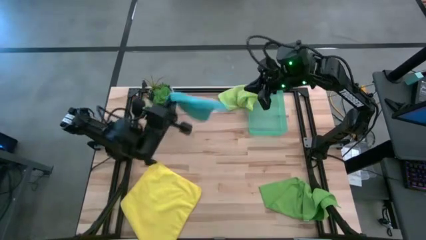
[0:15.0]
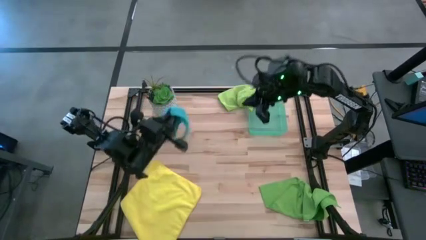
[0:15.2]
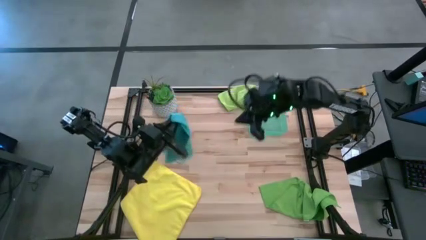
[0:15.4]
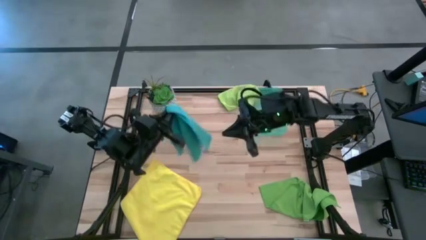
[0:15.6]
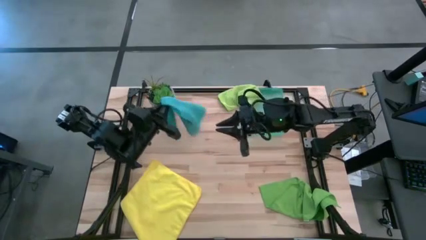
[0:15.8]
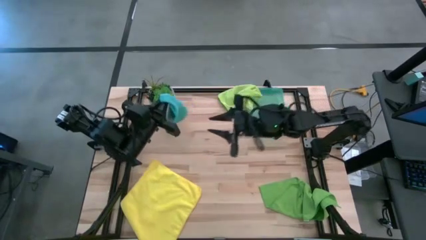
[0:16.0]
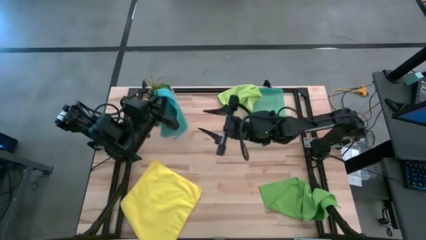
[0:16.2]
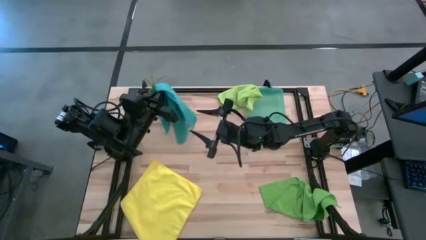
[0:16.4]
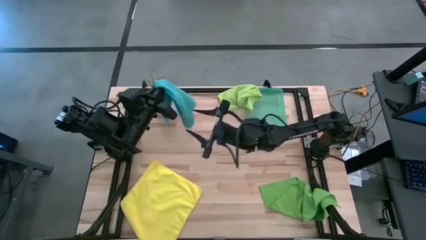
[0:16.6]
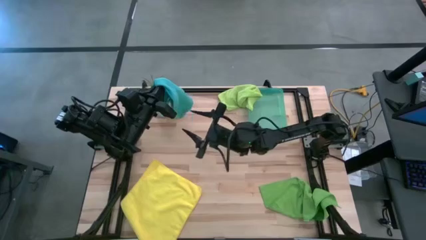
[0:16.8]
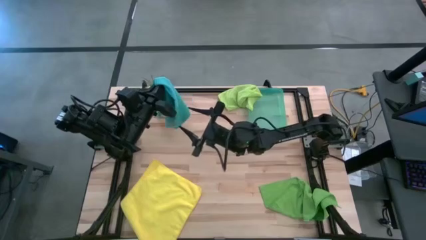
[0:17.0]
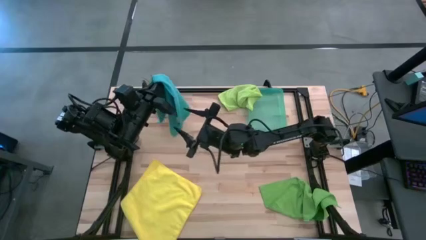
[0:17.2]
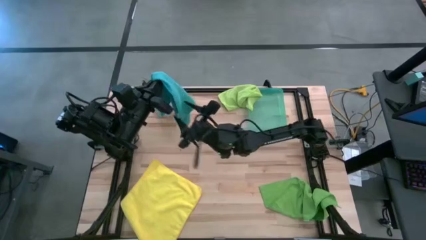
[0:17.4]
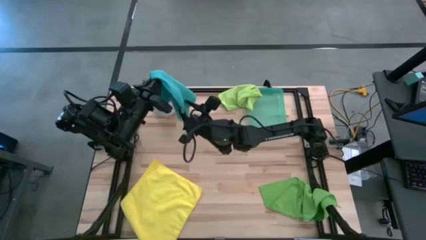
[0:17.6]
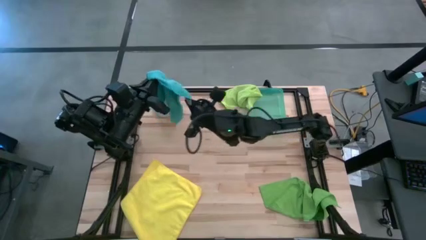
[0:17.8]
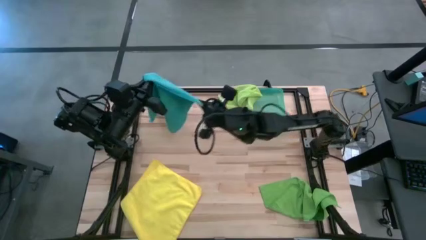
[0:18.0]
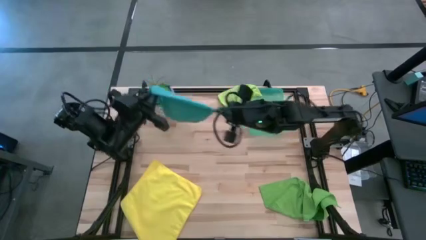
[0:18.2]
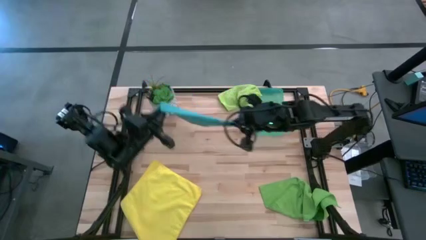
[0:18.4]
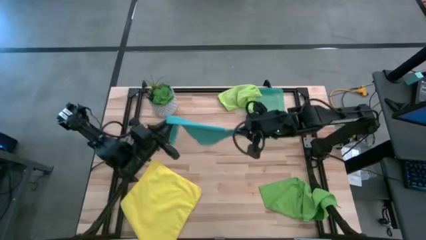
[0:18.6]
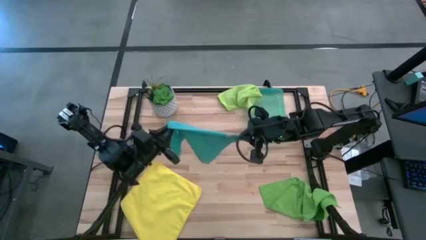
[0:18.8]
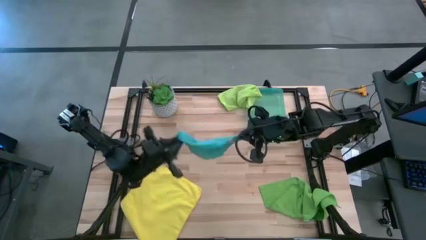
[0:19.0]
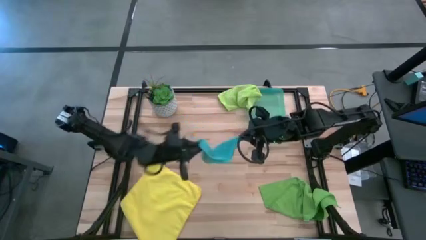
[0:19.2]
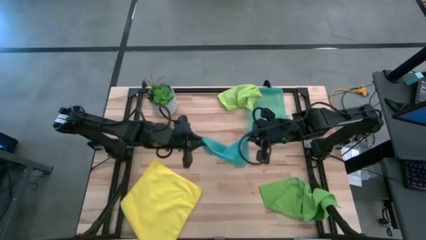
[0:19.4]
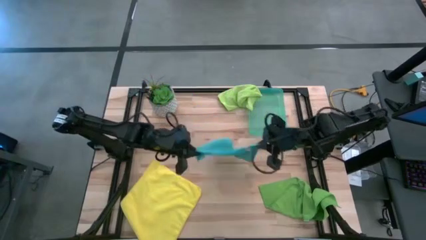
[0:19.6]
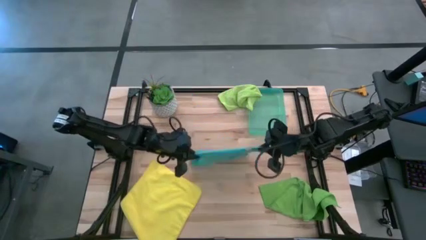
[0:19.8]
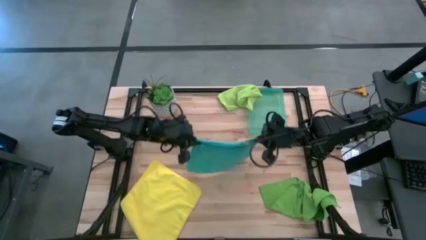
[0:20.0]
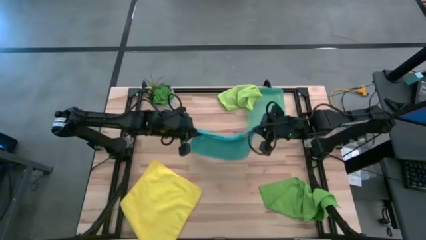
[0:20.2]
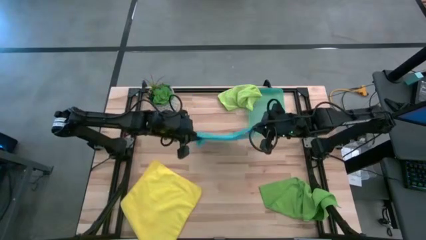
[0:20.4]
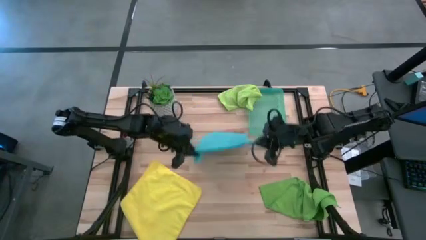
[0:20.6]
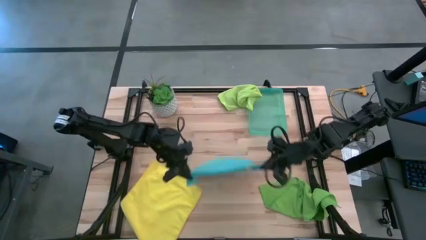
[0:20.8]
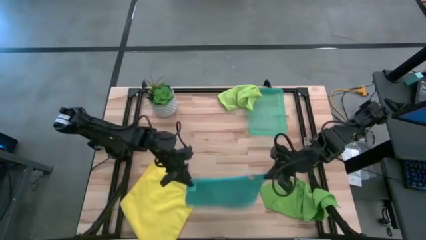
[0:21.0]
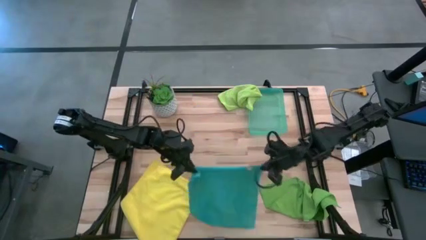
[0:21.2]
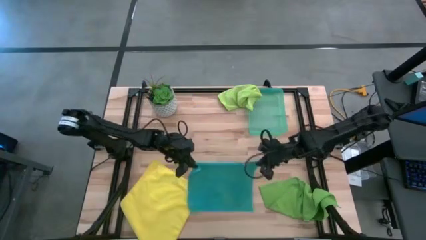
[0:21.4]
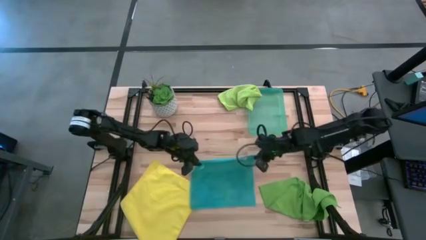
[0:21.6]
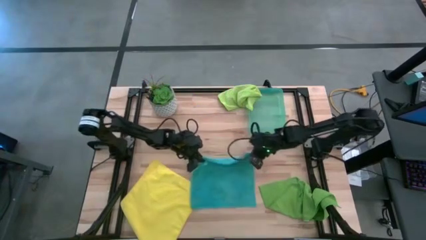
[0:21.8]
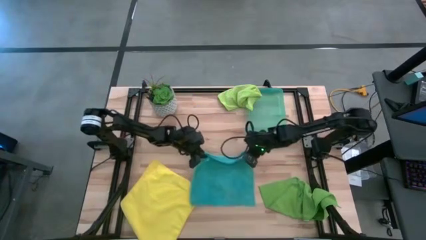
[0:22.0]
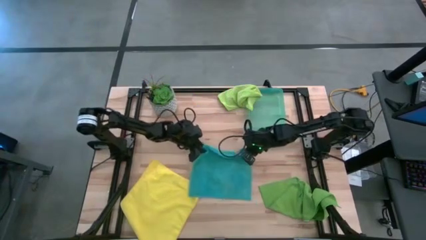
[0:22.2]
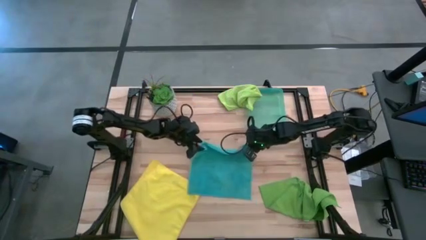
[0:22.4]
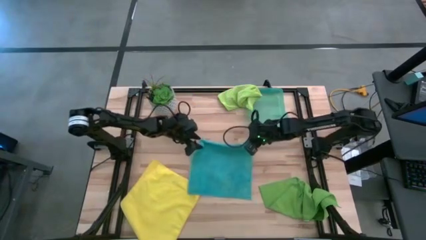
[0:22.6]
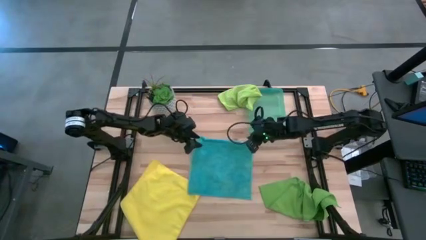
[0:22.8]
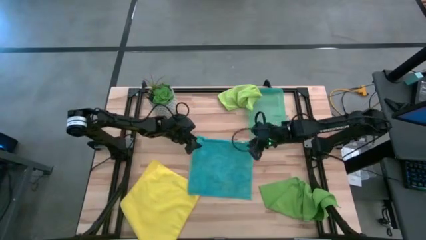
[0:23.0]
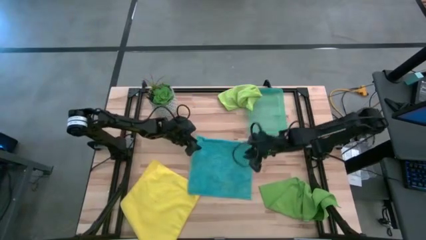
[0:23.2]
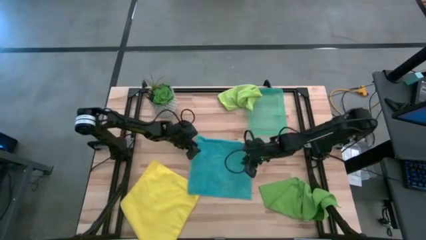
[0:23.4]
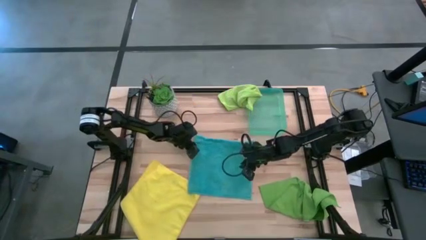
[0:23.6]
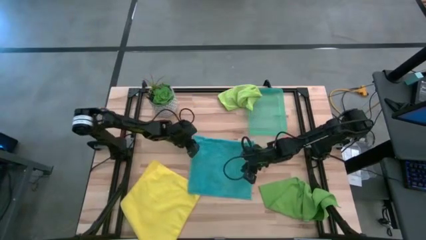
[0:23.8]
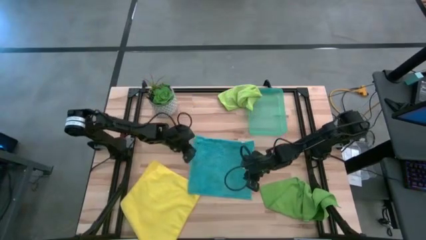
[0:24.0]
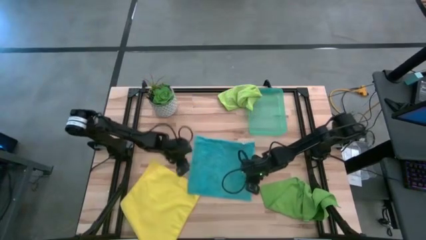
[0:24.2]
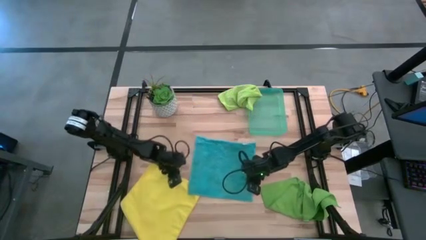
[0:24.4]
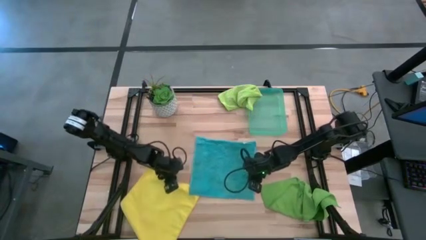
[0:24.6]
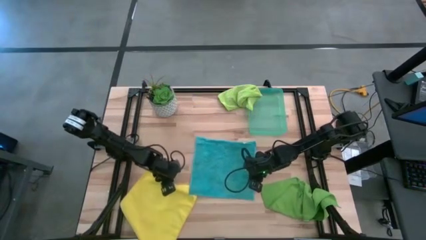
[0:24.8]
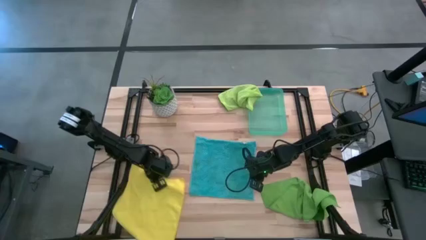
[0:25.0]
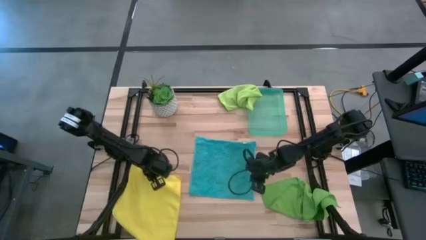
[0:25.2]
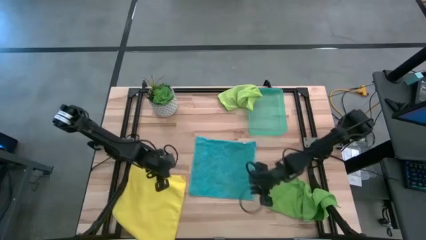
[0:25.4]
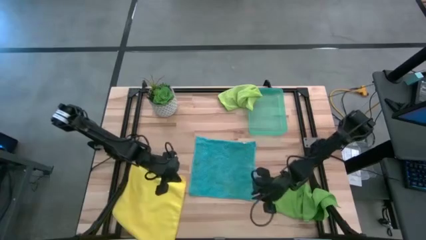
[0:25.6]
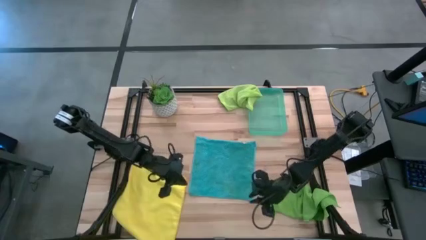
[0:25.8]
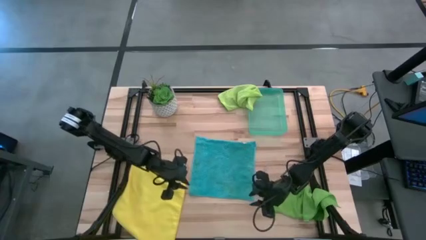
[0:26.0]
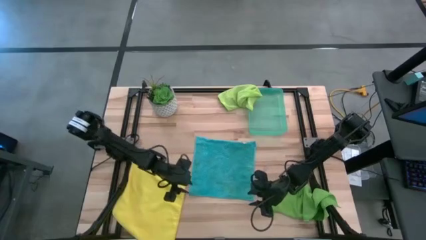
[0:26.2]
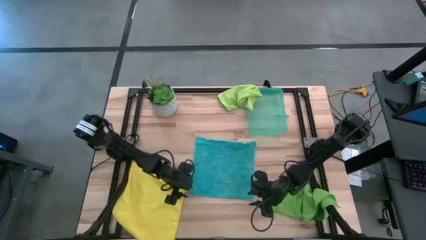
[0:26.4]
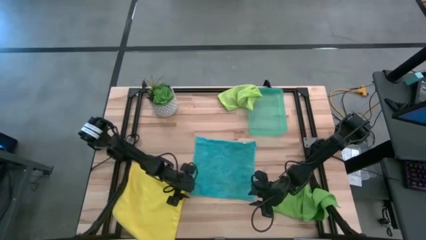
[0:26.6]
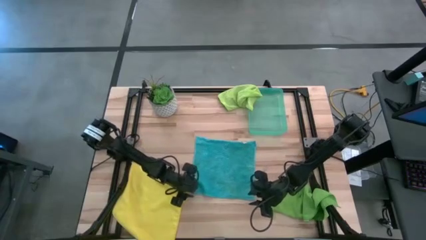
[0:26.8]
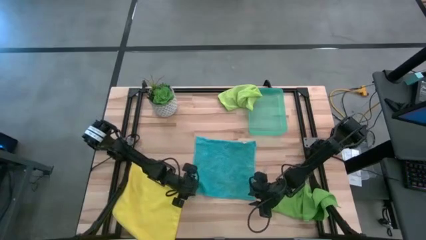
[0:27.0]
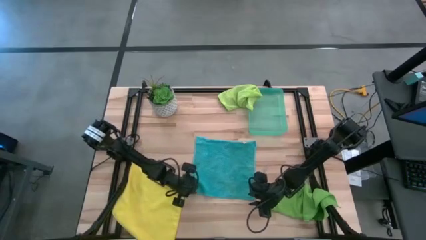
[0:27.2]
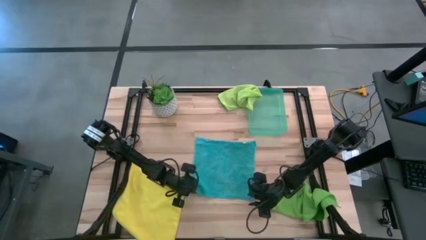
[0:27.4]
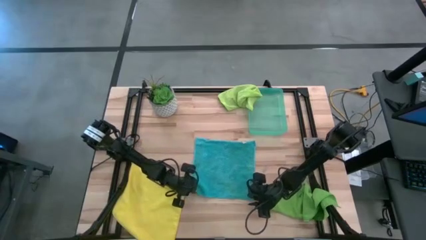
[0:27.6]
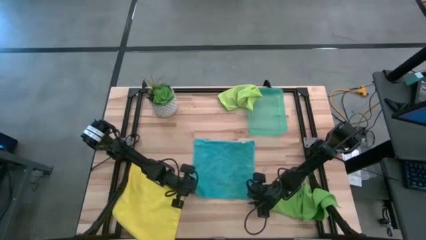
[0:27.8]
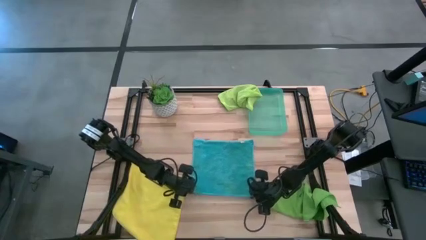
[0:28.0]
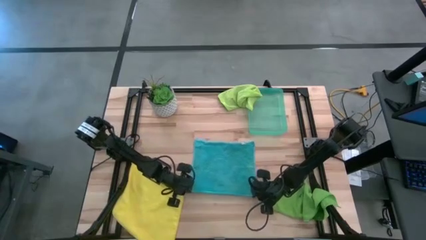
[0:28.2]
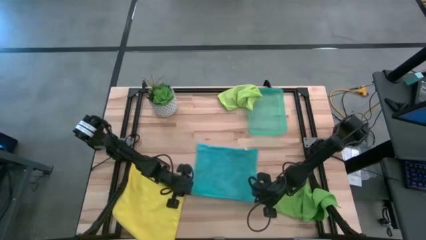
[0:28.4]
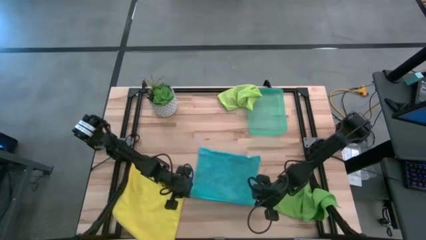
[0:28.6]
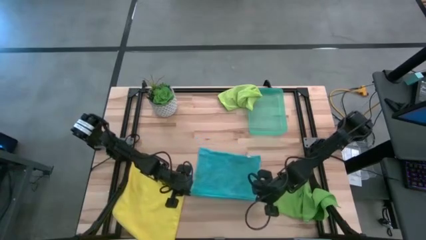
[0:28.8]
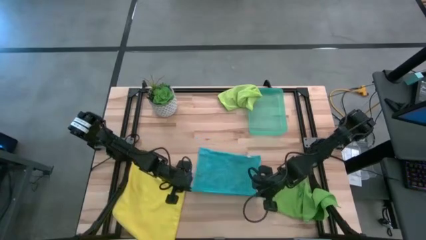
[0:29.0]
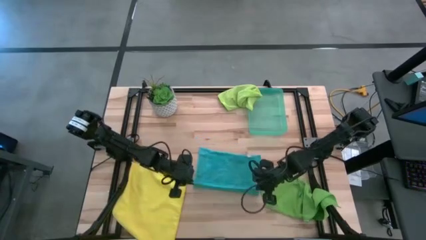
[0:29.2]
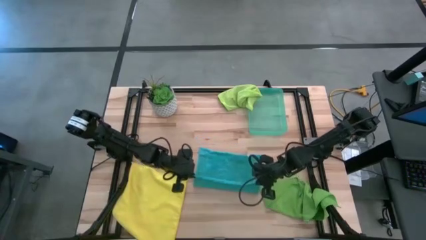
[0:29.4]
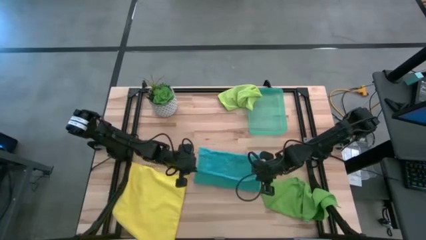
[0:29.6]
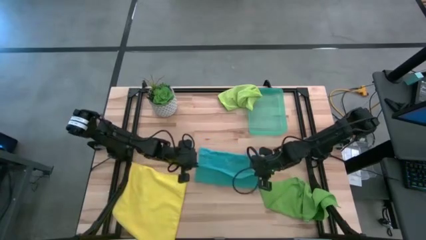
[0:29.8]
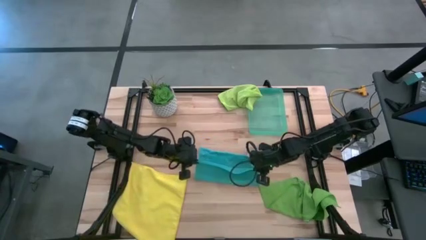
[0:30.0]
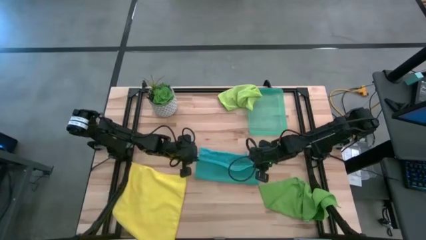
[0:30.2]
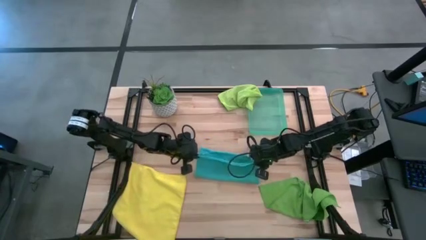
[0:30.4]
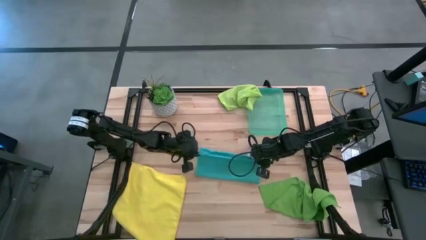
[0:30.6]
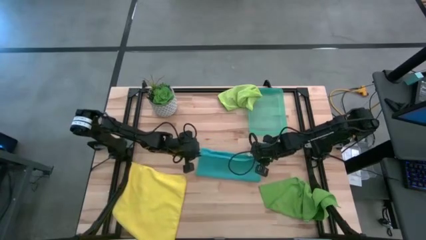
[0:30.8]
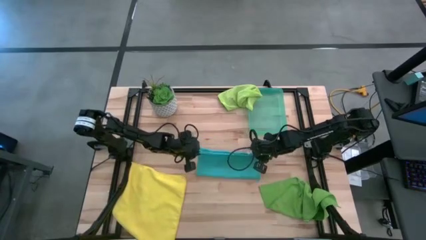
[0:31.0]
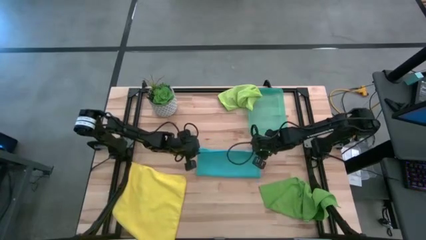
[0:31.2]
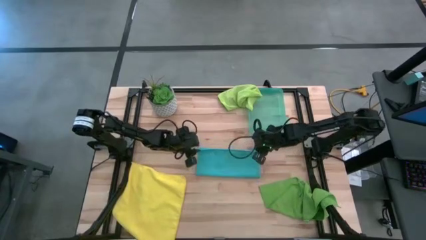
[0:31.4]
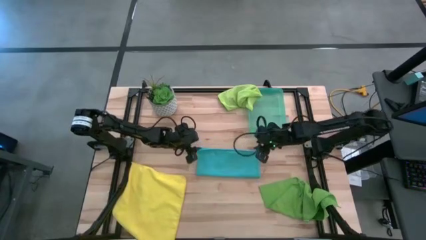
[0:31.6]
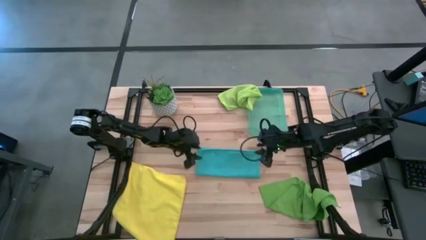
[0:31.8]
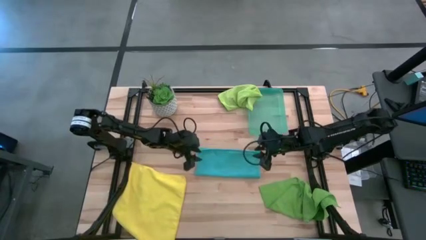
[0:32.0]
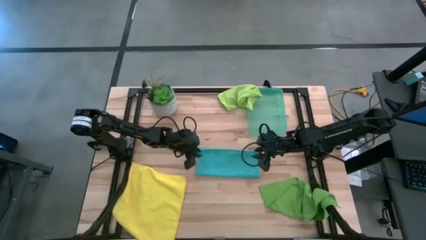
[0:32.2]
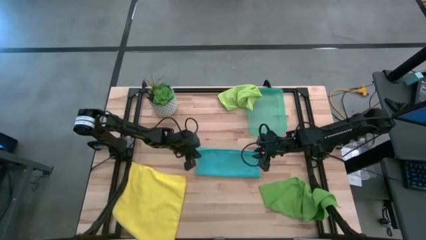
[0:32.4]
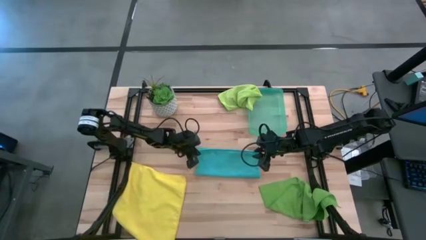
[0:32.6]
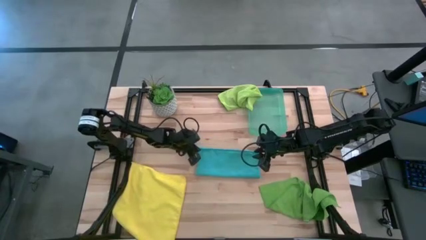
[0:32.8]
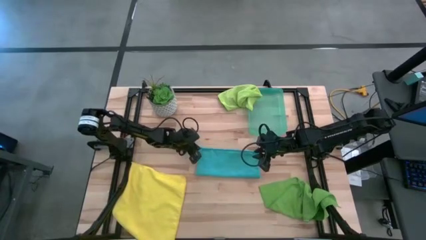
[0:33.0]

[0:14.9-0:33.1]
Task: Fold microfiber towels
Fold the blue towel
